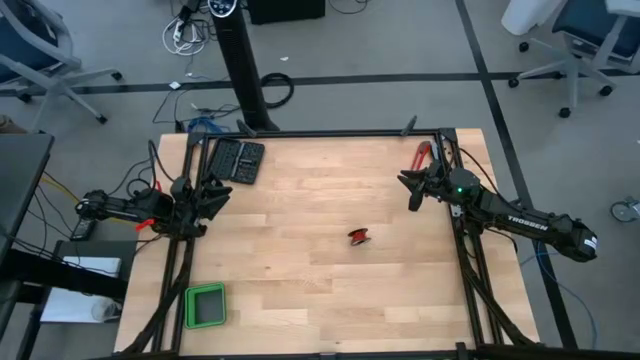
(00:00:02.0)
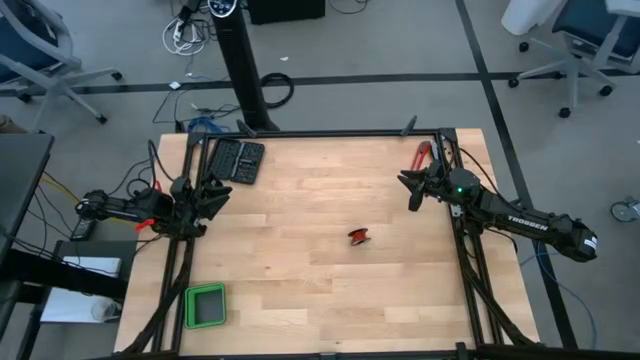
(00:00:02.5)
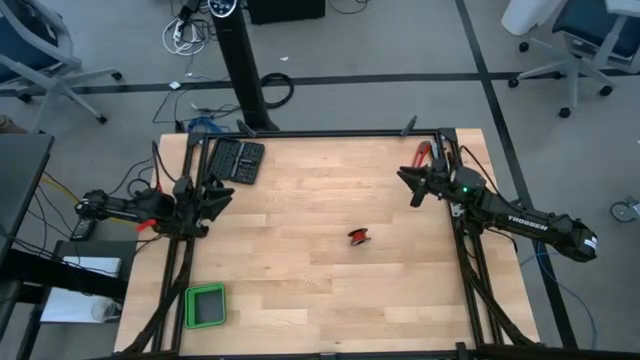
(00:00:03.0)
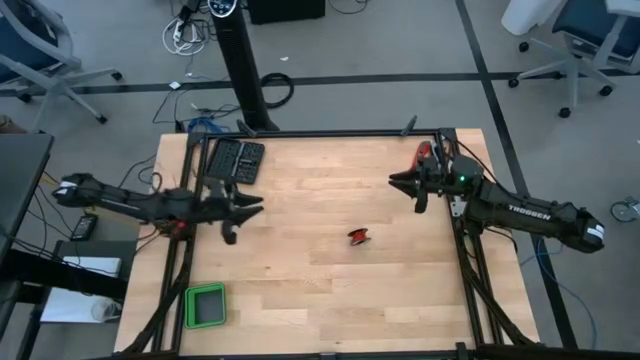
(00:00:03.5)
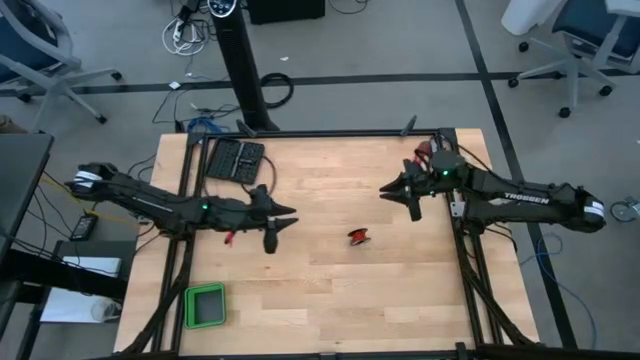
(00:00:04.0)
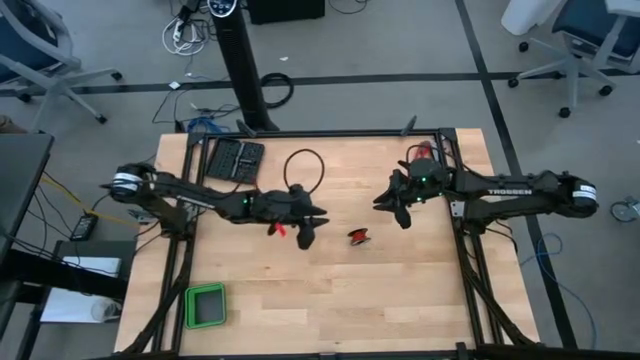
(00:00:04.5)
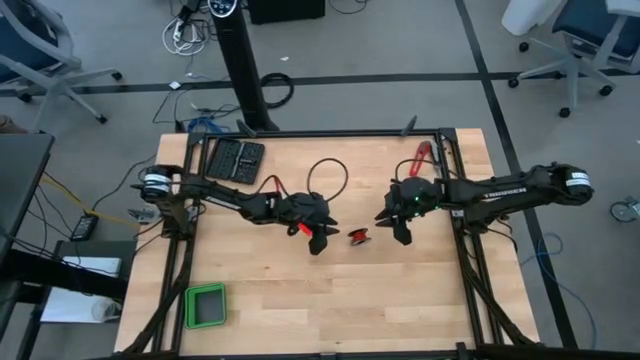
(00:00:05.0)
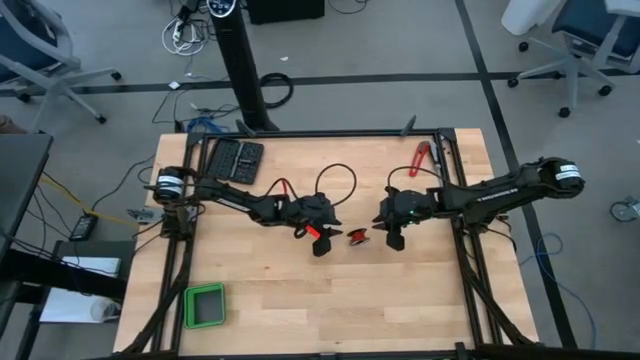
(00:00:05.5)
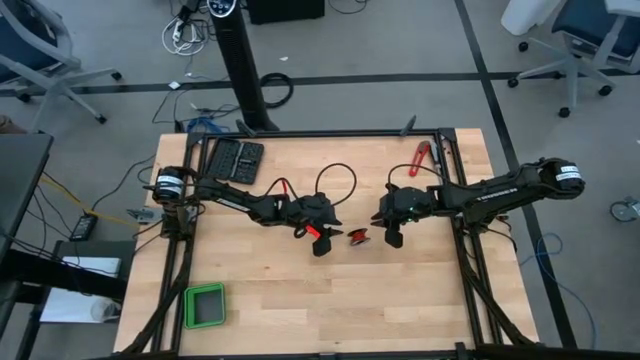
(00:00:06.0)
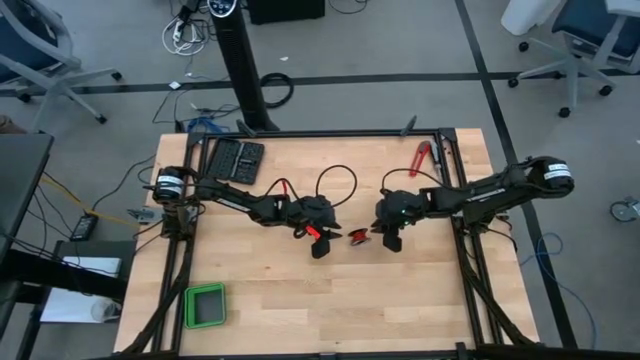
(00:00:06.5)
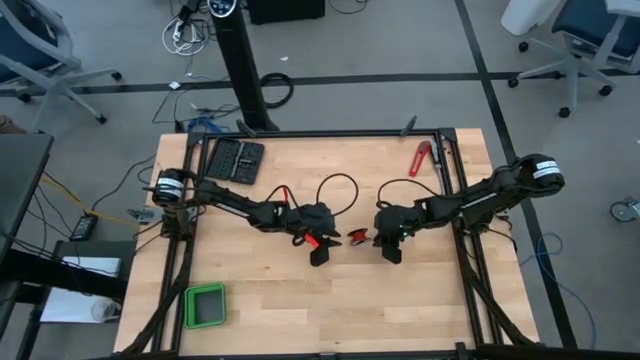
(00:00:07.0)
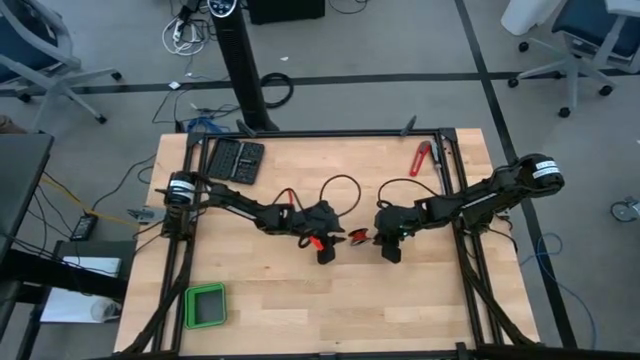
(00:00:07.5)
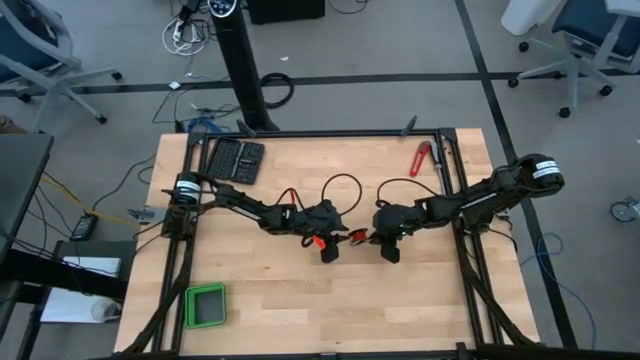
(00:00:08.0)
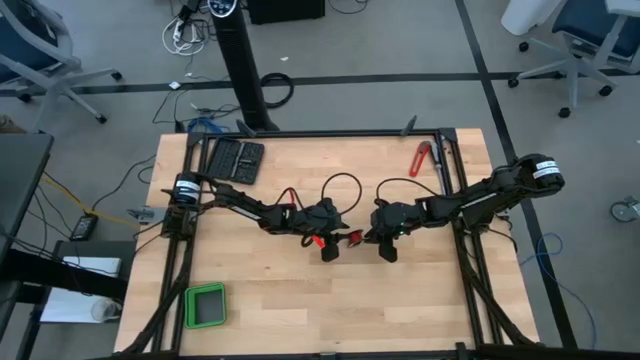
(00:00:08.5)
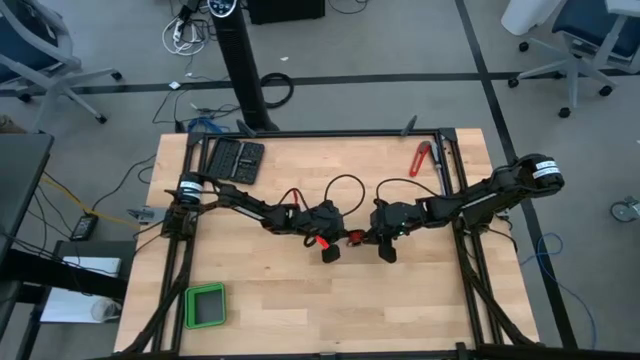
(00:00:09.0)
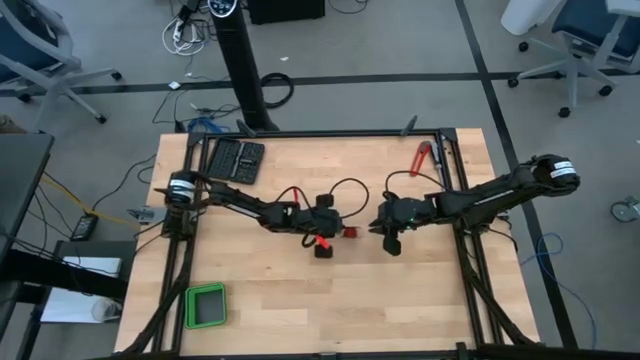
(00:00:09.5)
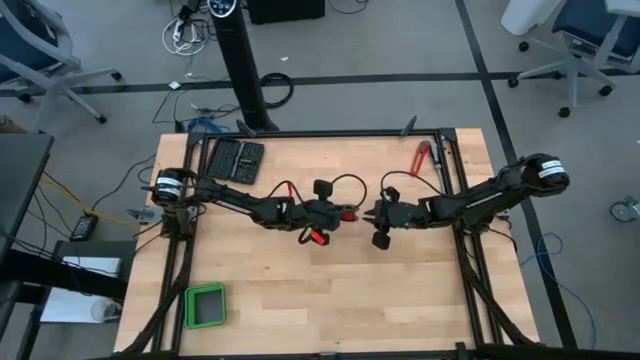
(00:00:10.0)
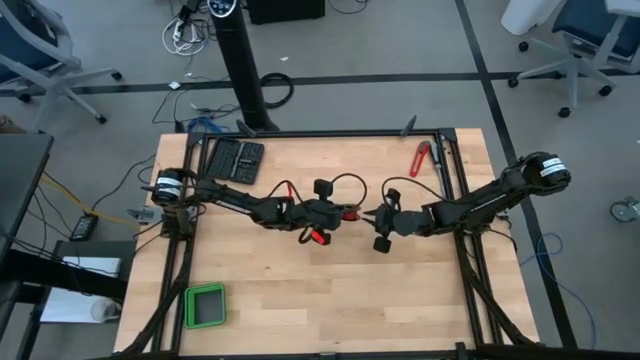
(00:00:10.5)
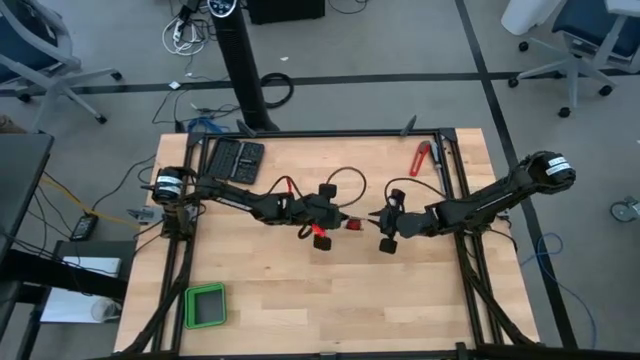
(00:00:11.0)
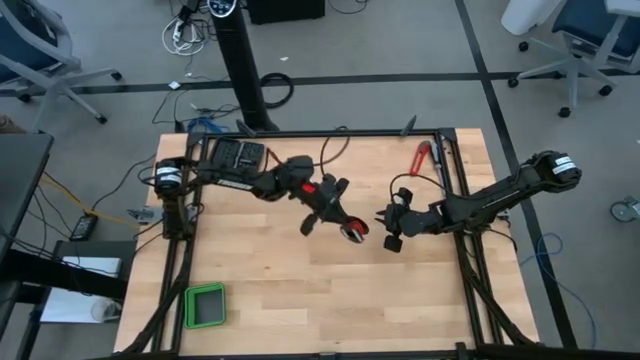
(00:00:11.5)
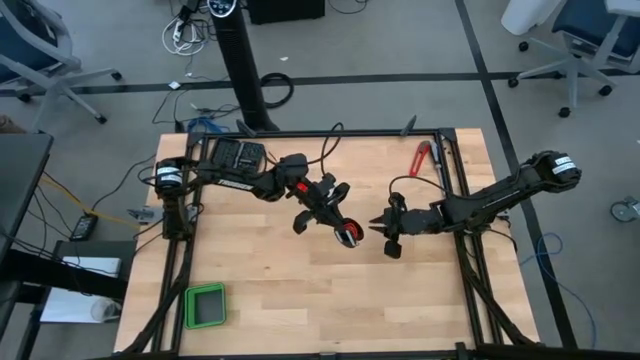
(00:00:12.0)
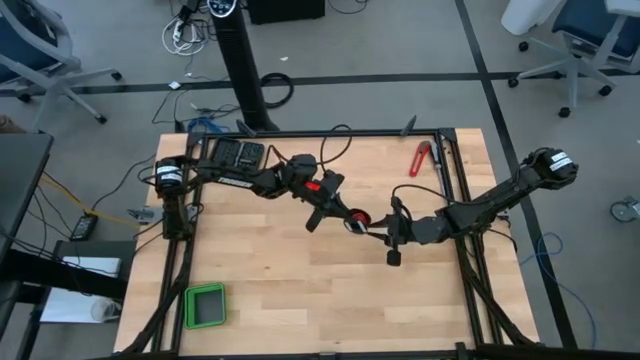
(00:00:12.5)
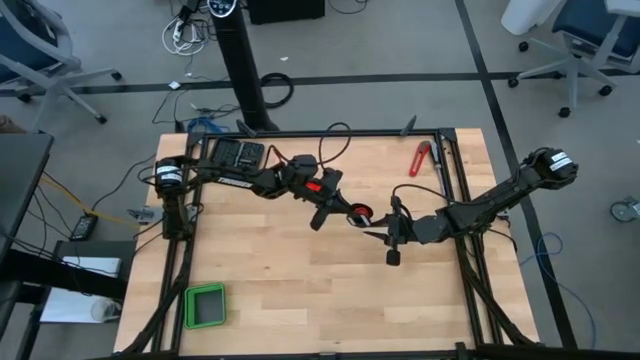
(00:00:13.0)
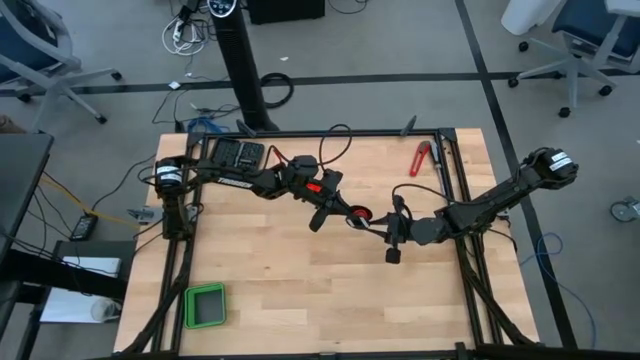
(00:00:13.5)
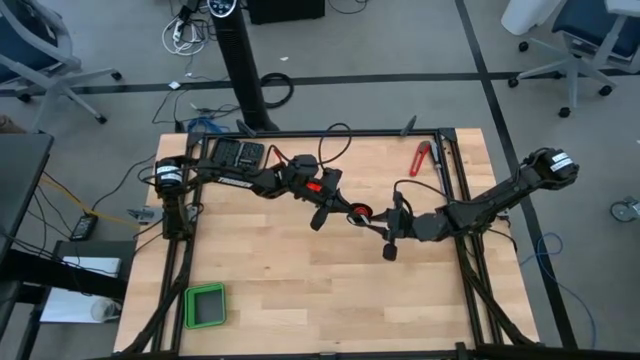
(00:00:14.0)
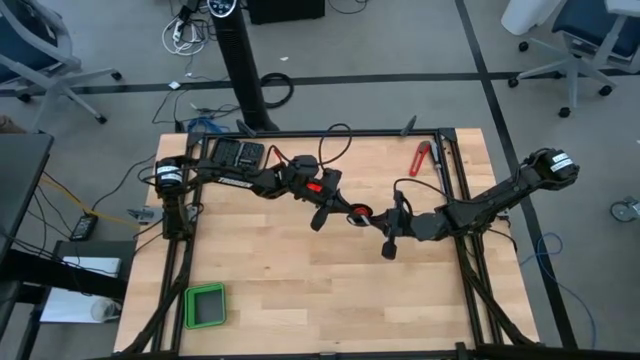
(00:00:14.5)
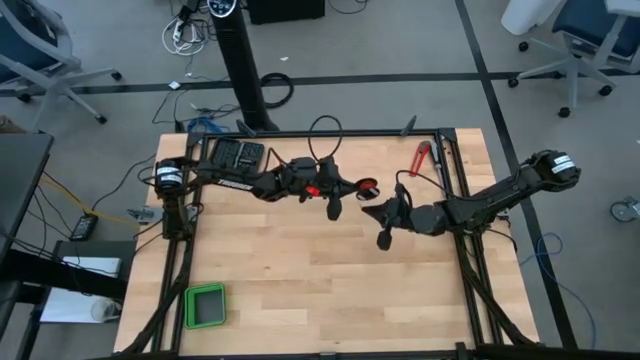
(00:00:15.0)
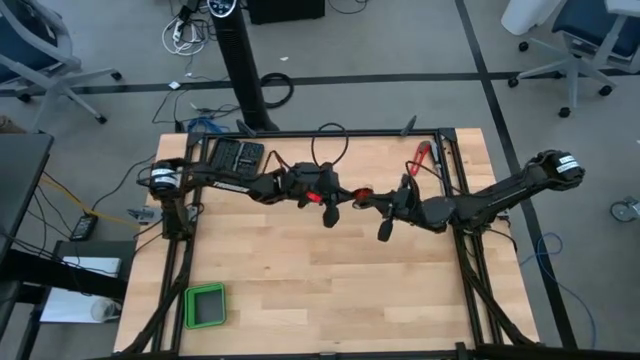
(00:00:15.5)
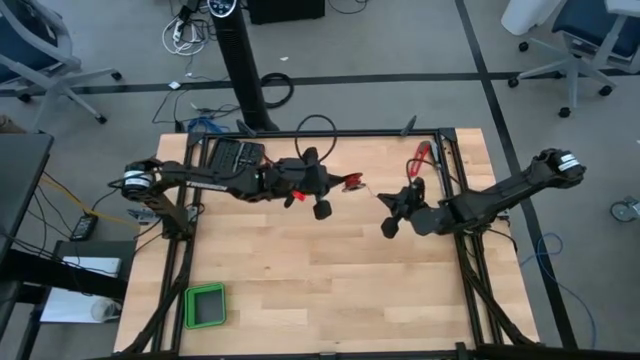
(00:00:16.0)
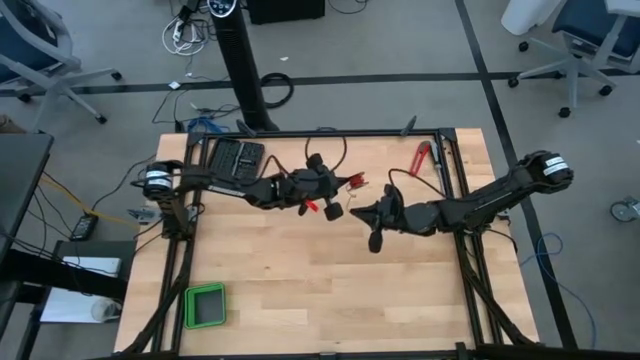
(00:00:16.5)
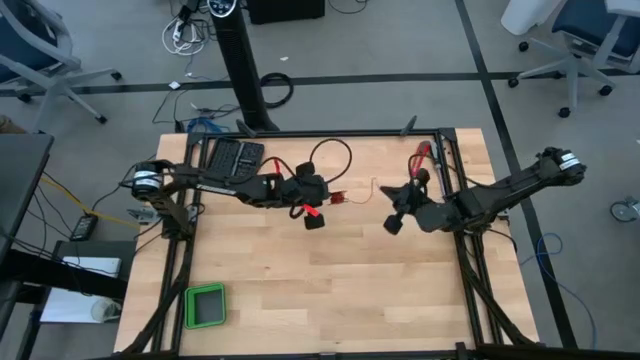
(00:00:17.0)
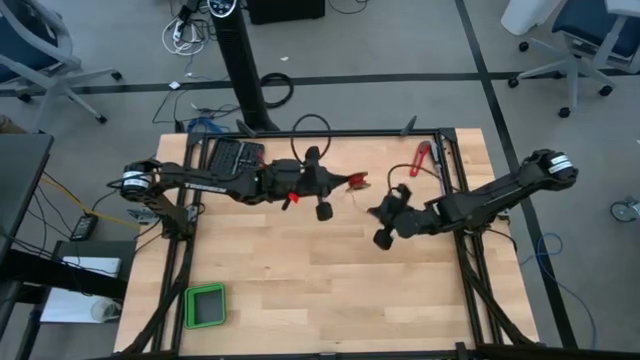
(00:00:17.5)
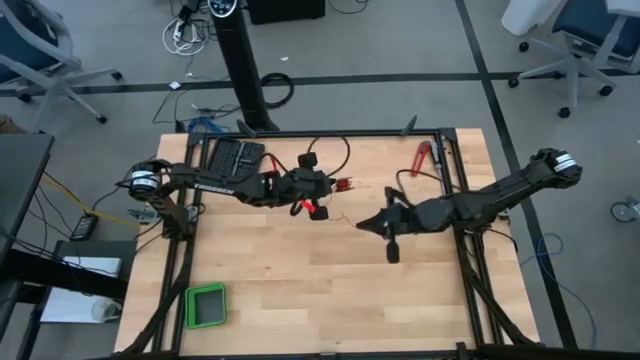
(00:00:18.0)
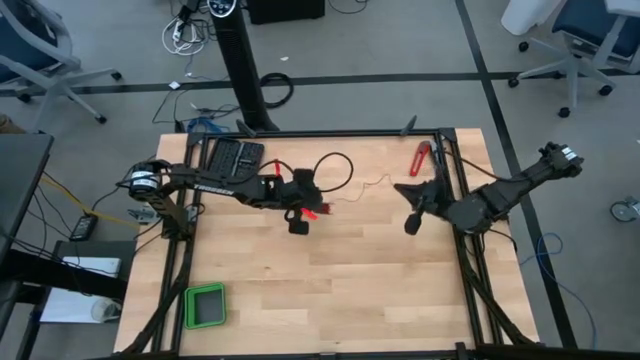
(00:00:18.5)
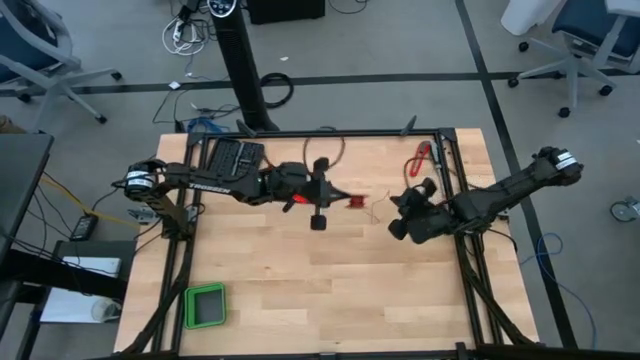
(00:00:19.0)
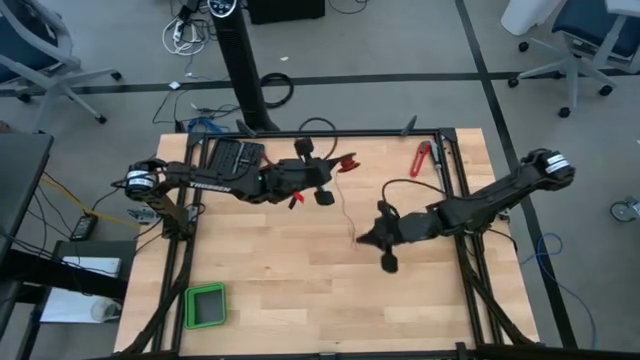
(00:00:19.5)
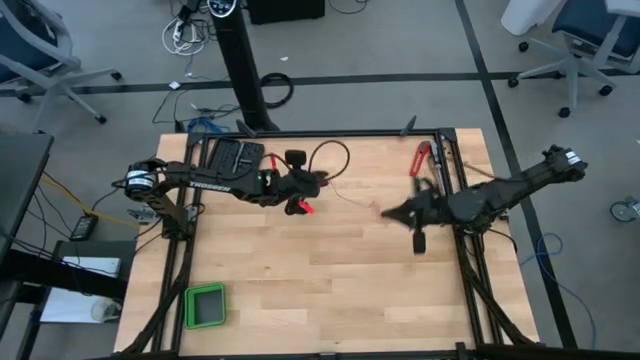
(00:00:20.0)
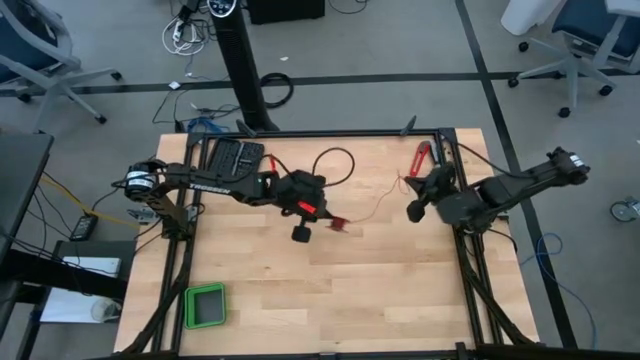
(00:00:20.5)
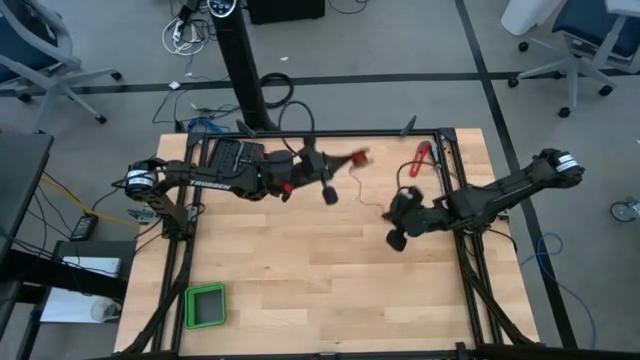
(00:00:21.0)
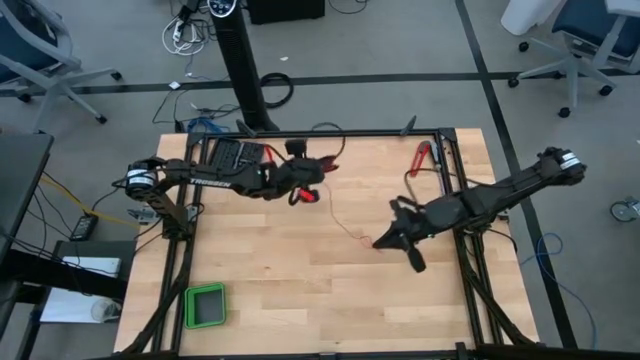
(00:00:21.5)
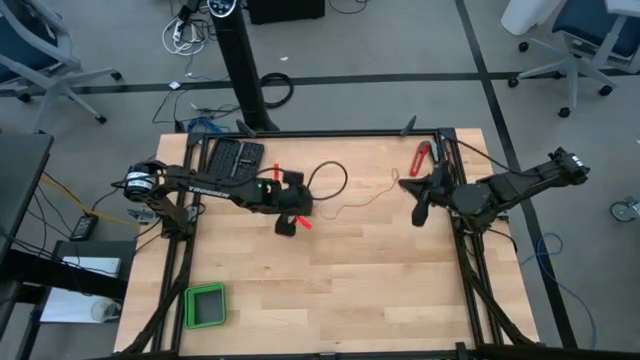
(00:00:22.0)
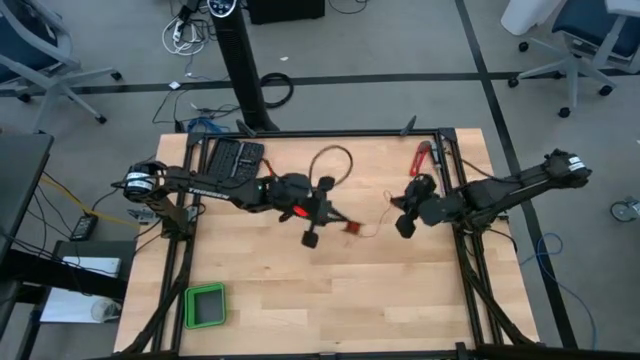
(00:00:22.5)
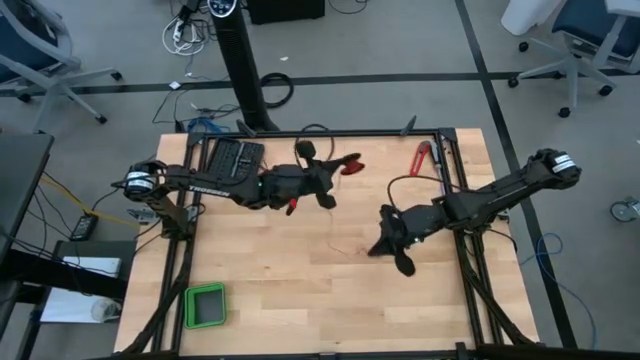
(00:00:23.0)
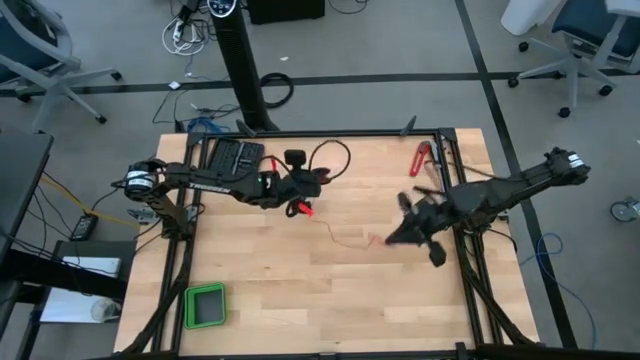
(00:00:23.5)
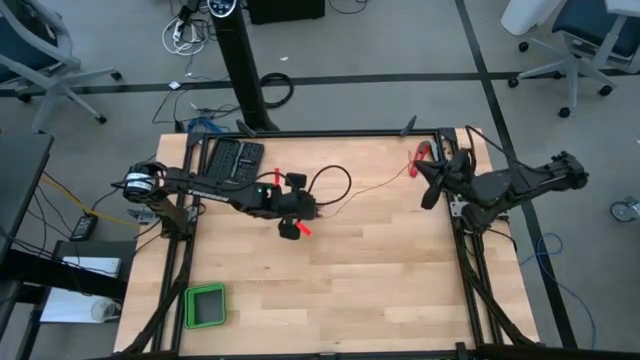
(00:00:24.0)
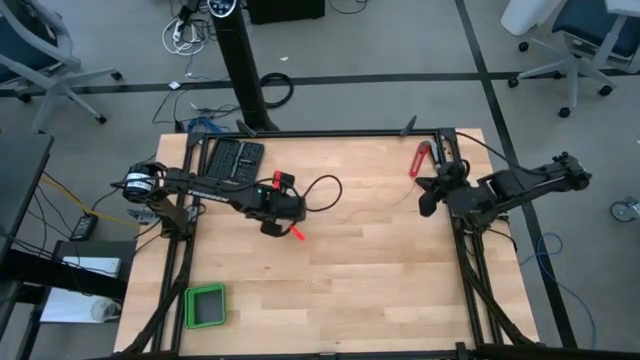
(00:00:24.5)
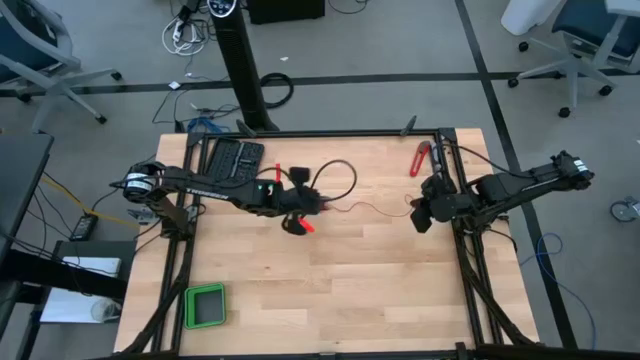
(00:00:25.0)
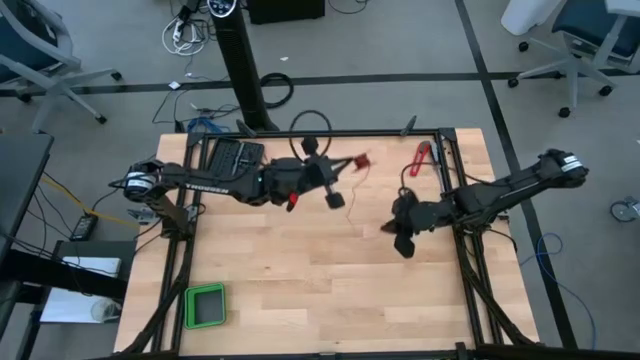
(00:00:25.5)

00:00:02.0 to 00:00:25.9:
Task: Coil cords
Uncoil the red wire from the black spool
